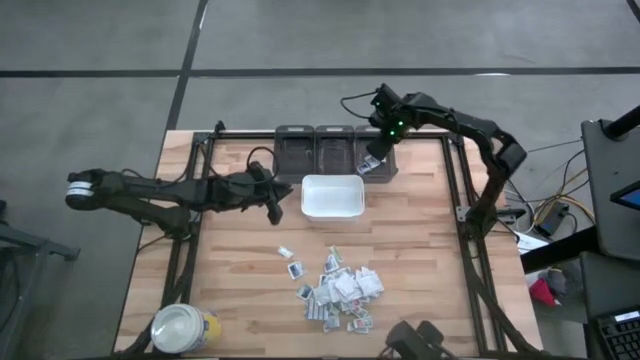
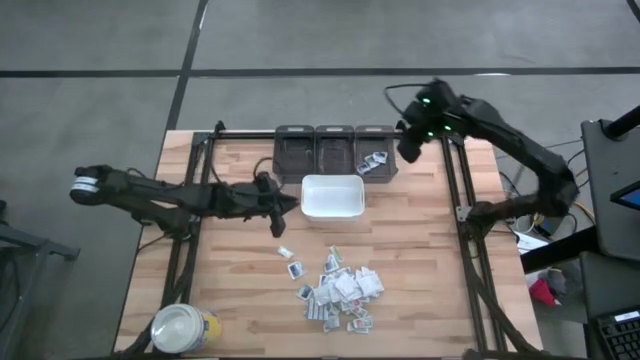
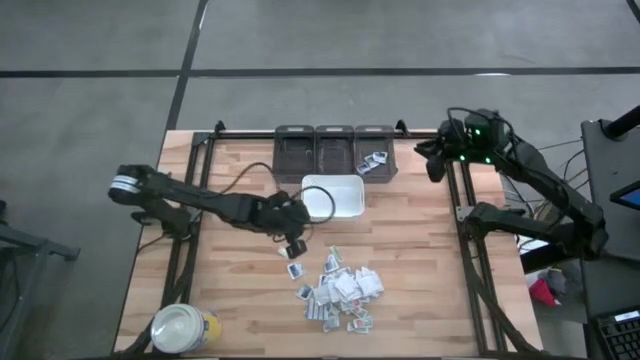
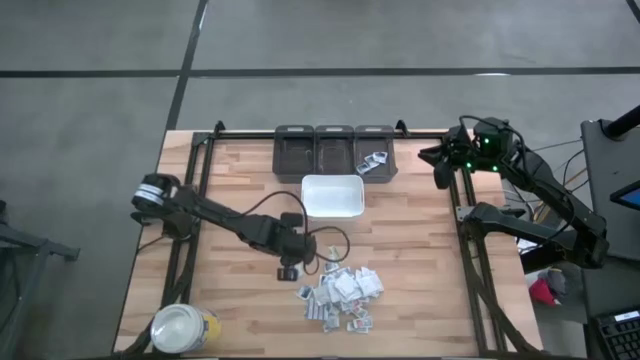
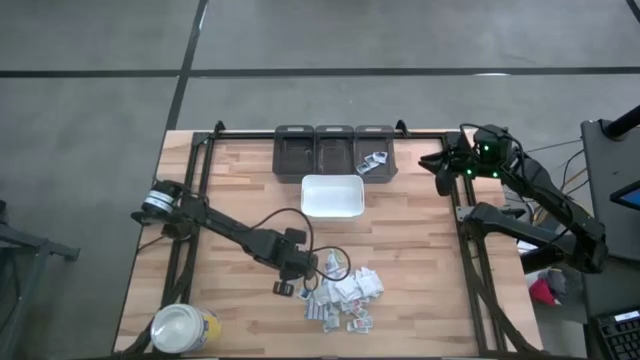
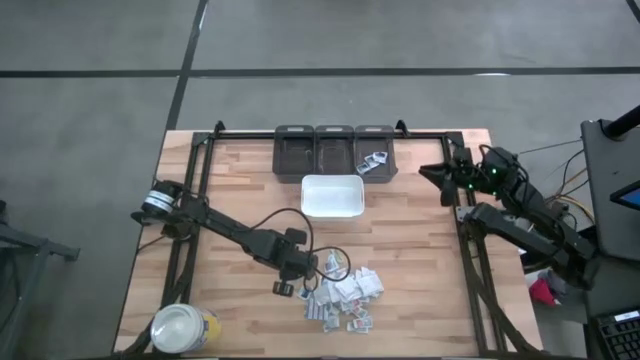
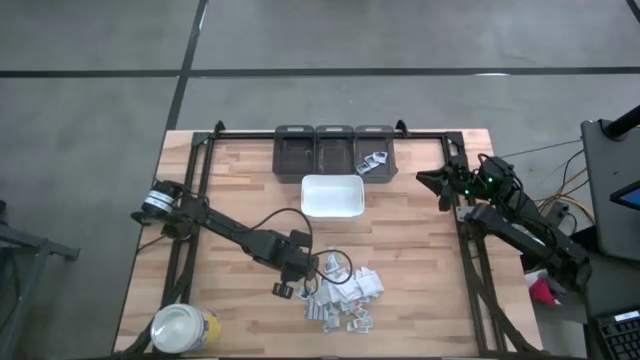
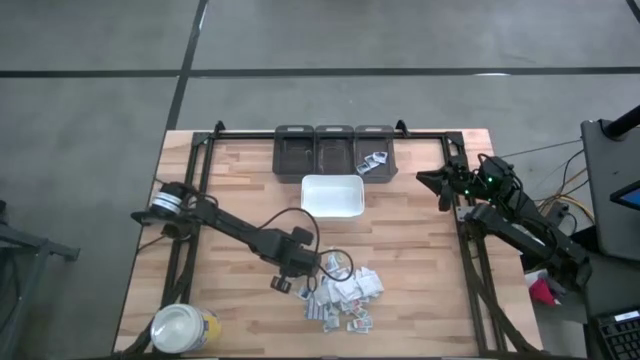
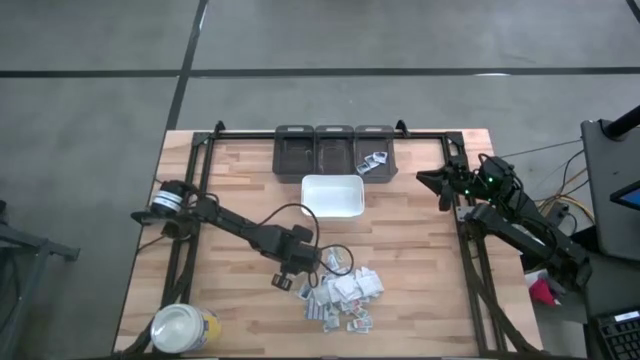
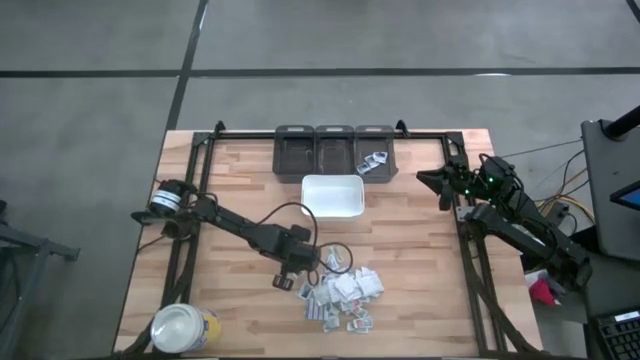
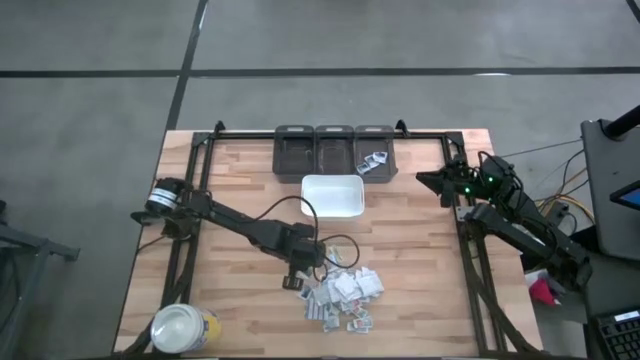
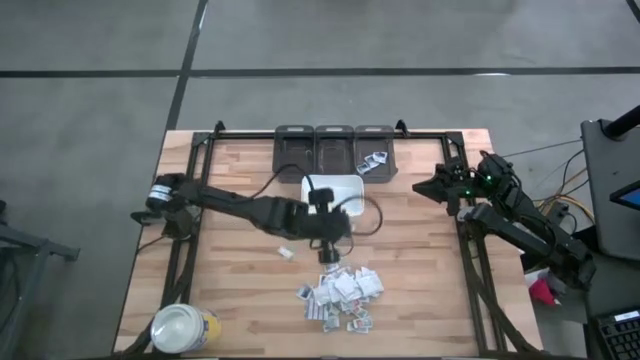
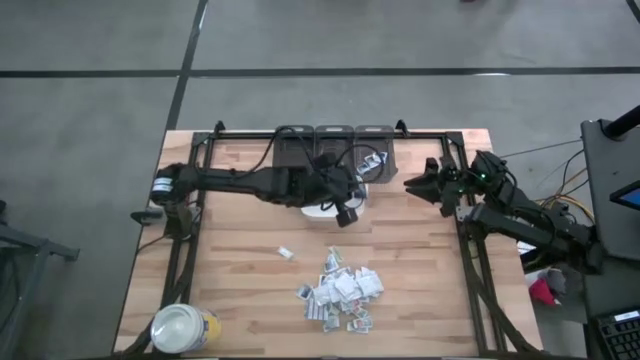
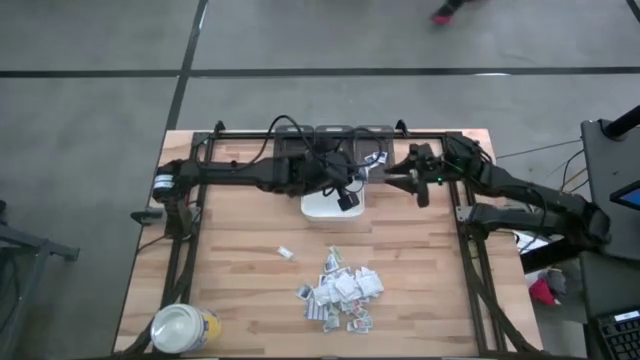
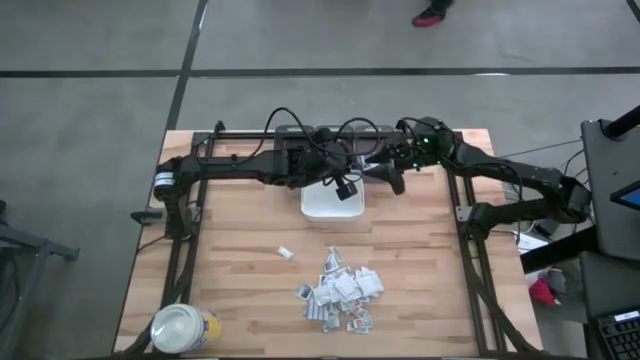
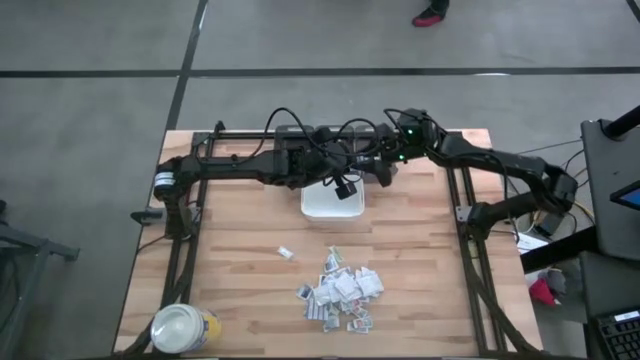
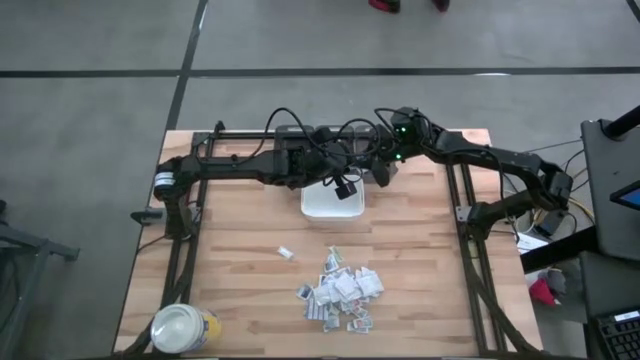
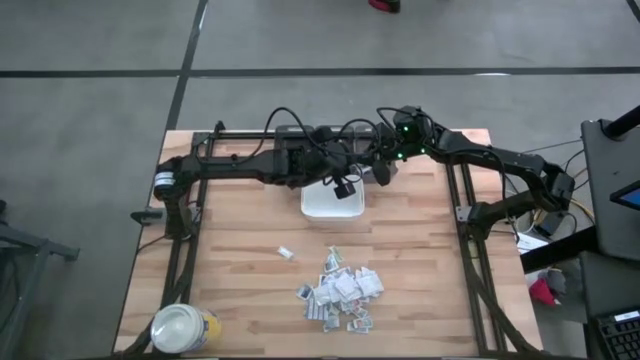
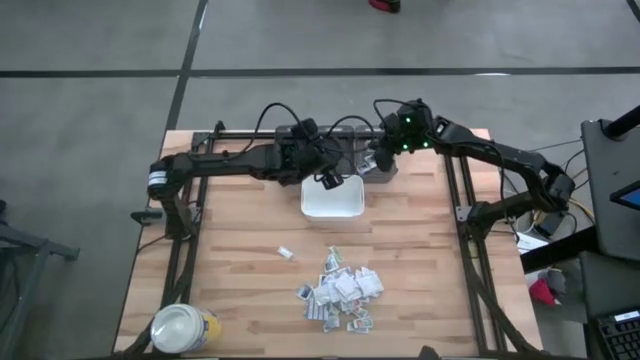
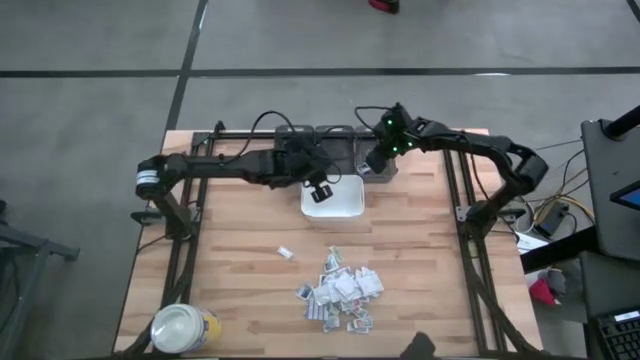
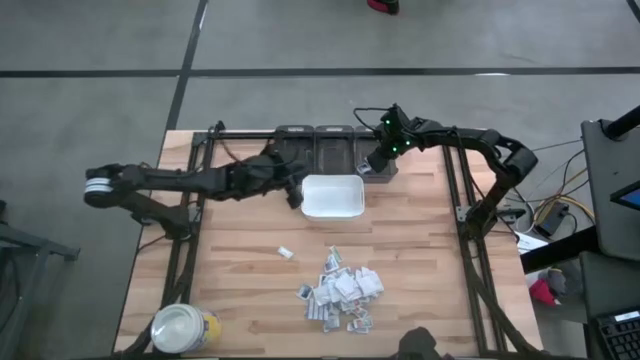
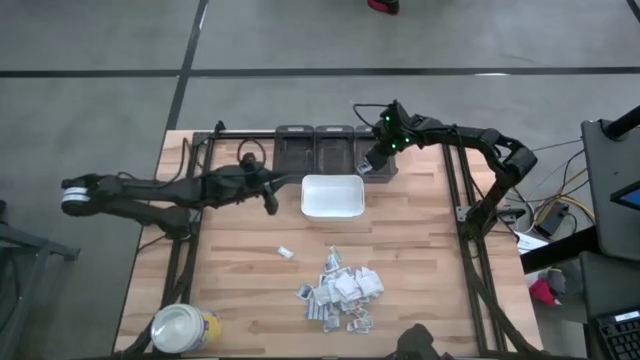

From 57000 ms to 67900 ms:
Task: Pick & Place First Aid Supplies
Put the white alcohol pad into the right black bin

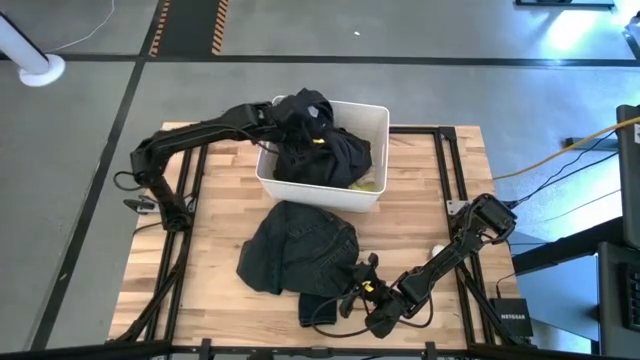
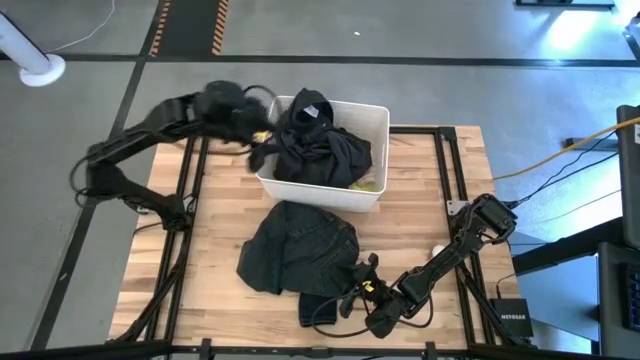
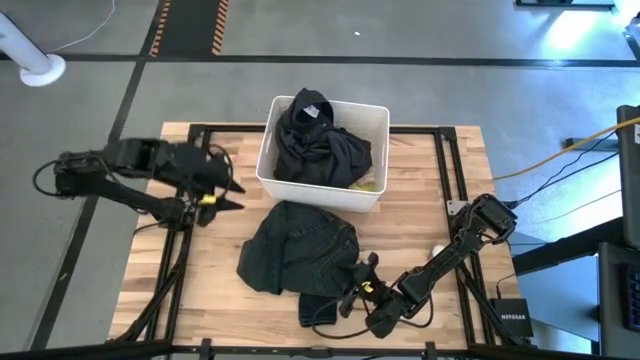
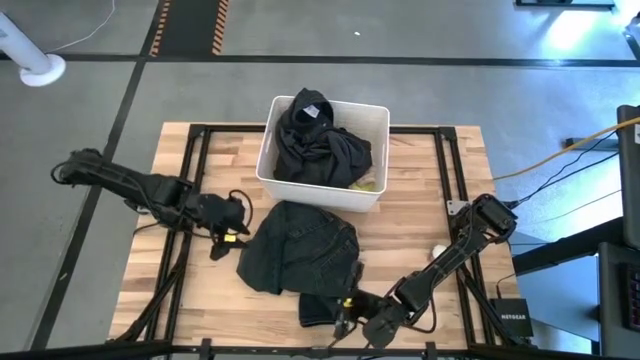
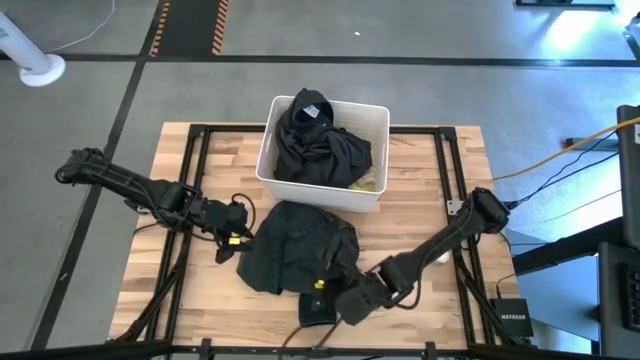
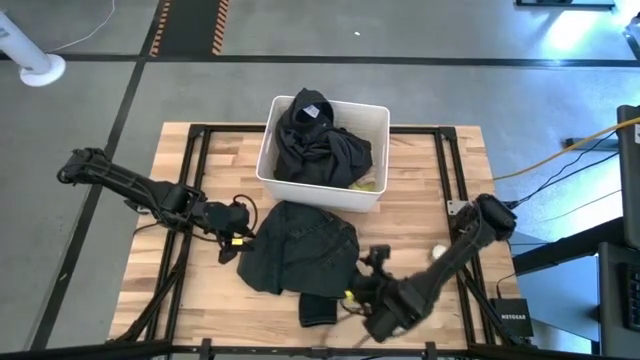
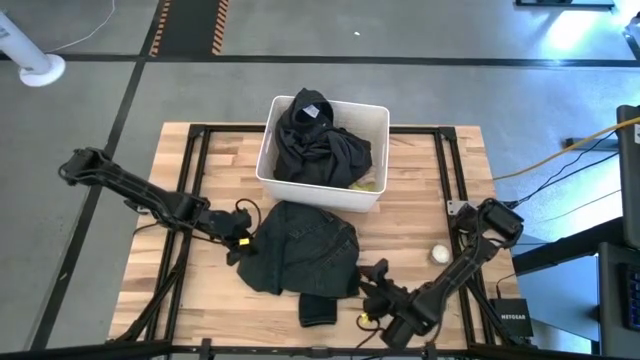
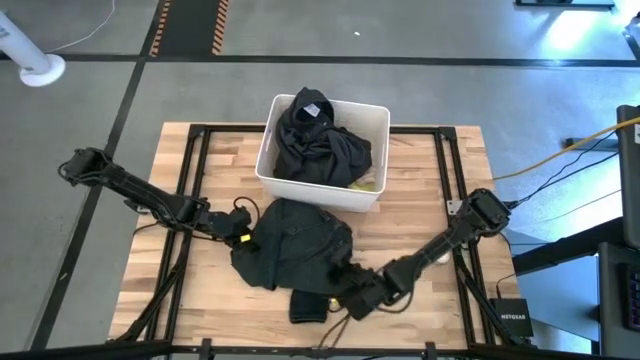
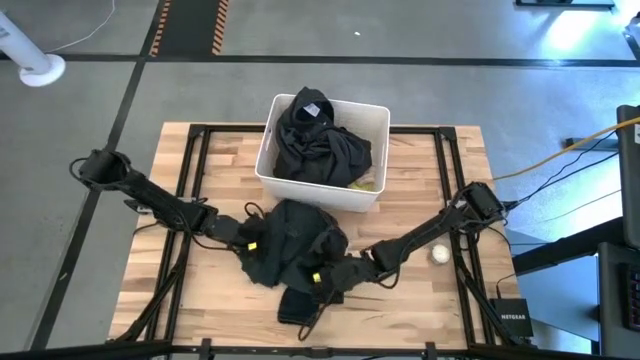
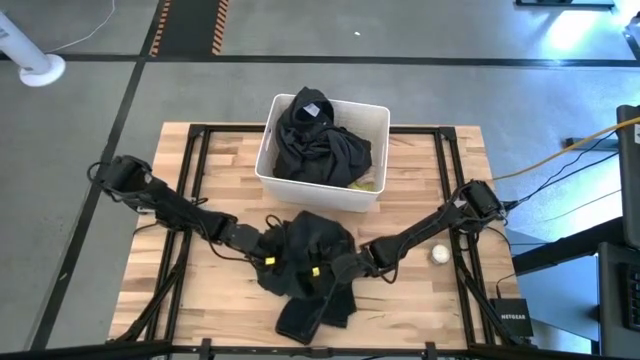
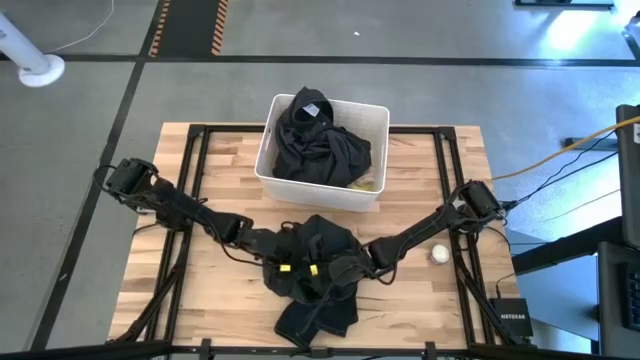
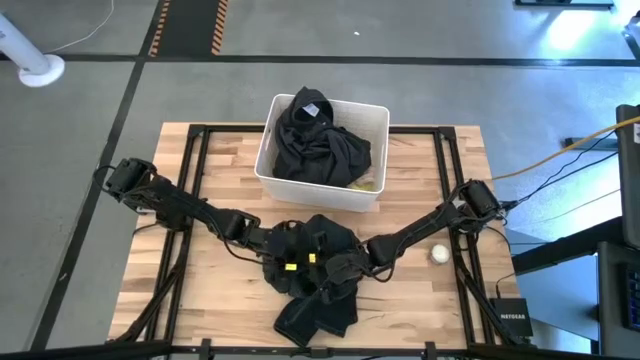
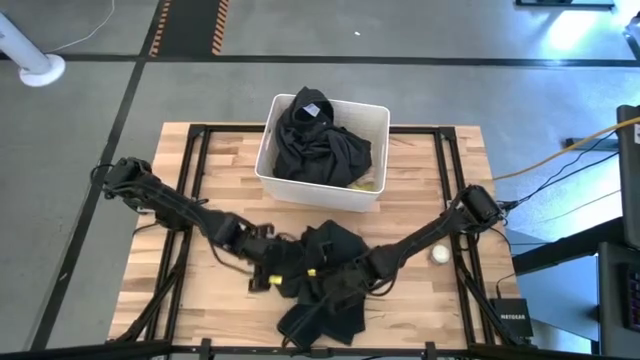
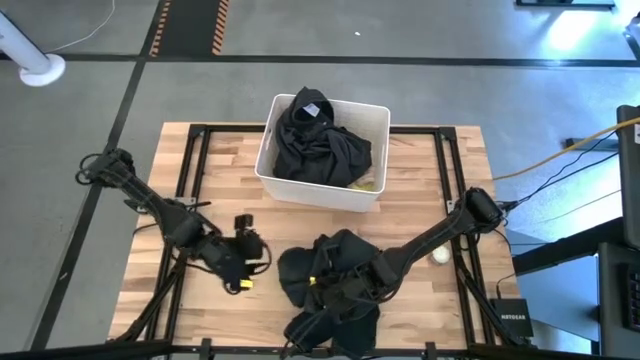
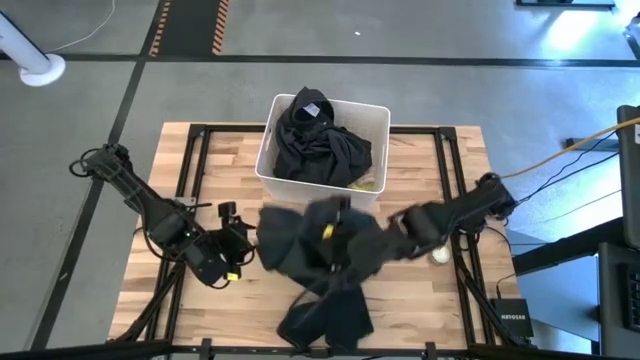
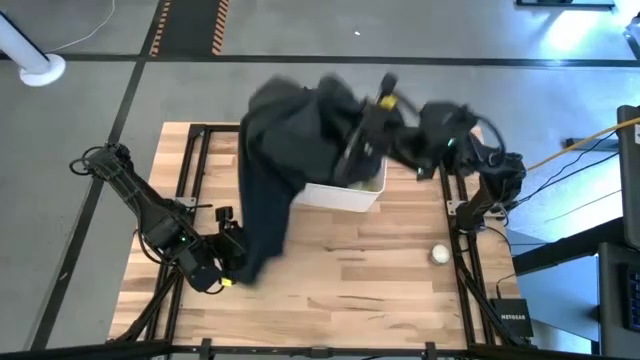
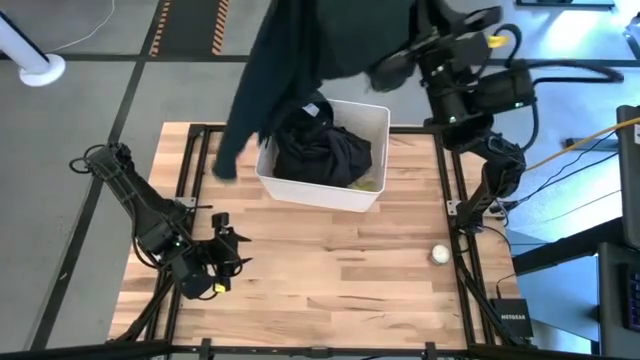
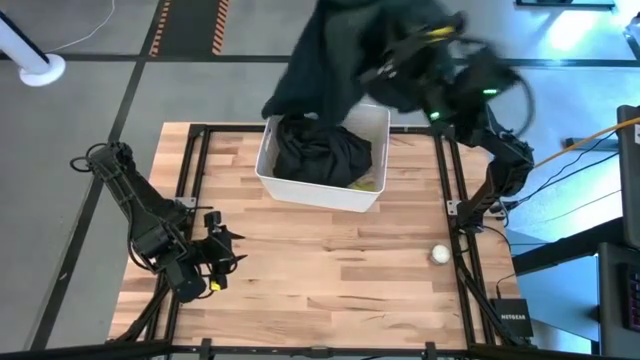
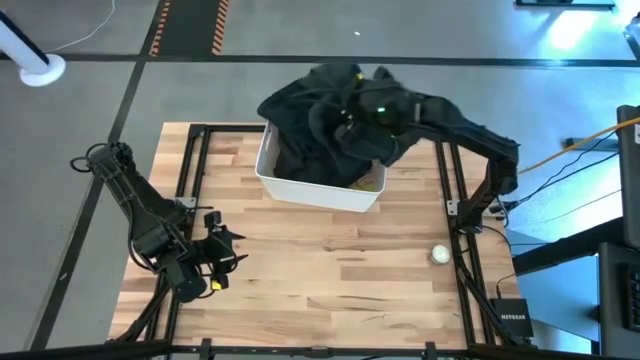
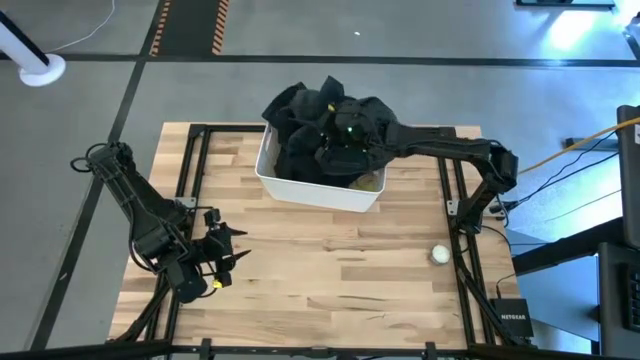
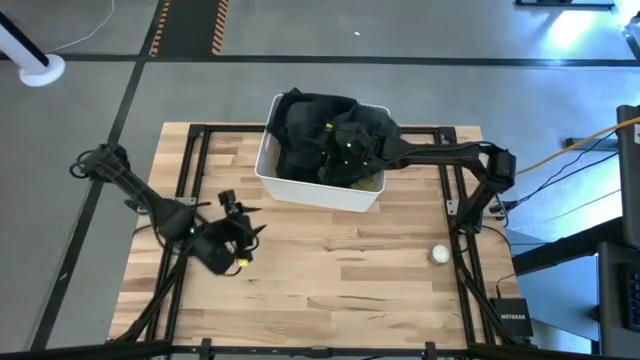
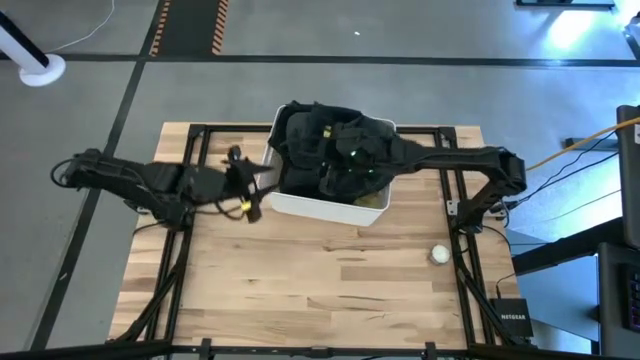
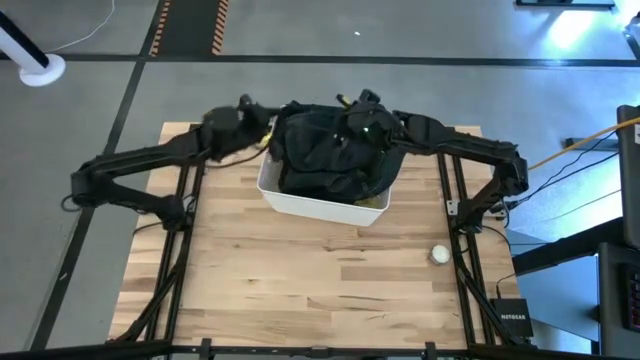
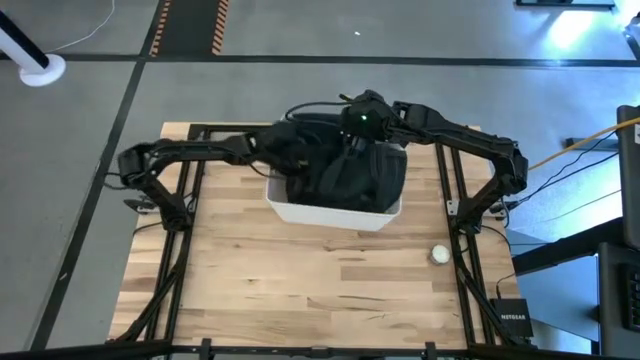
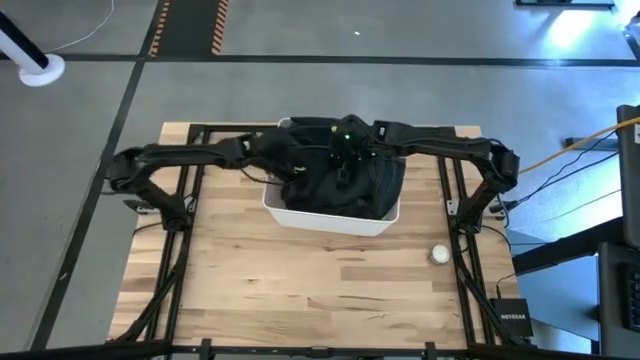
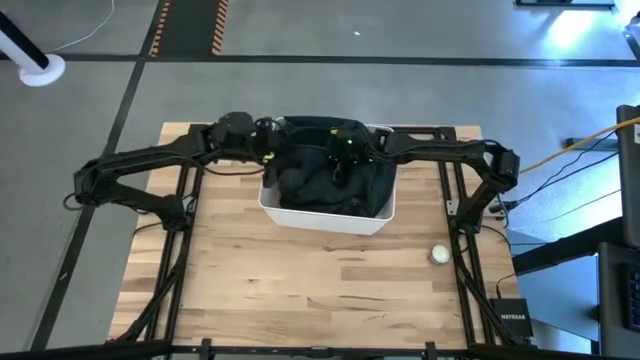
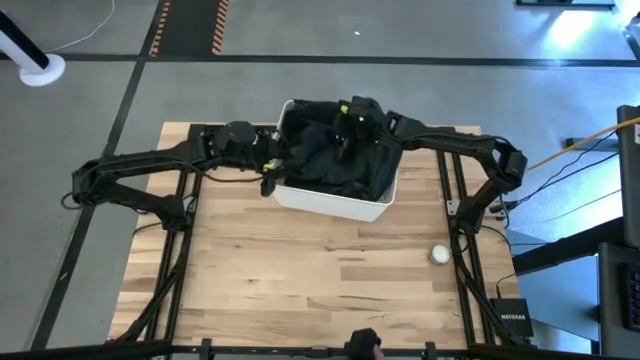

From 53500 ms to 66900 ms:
Task: Sort clothes
Put the blue jeans into the white bin
